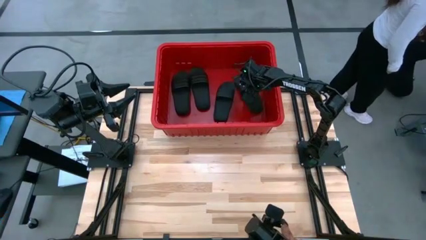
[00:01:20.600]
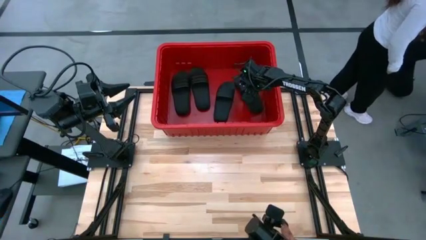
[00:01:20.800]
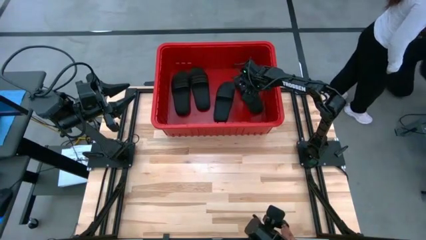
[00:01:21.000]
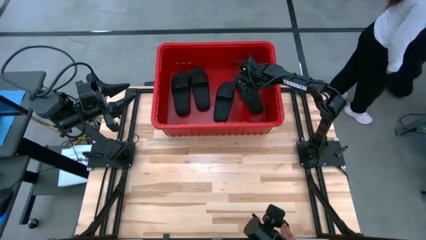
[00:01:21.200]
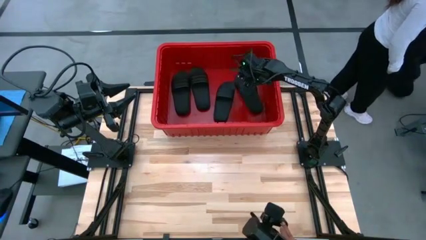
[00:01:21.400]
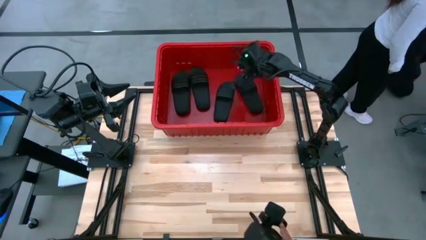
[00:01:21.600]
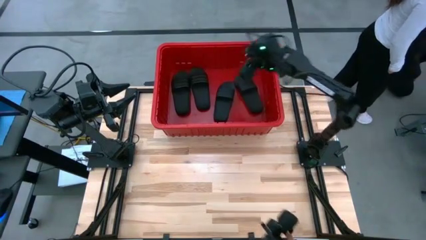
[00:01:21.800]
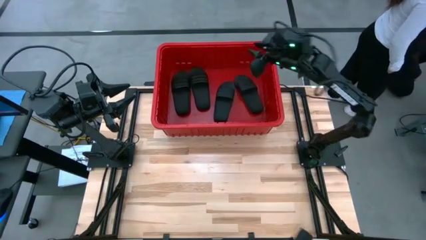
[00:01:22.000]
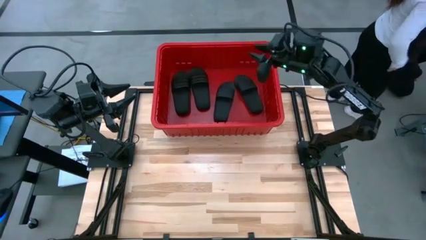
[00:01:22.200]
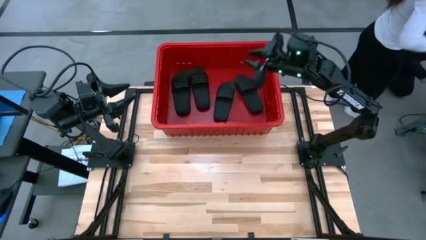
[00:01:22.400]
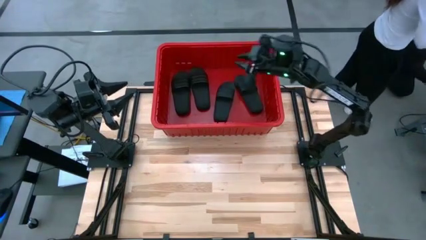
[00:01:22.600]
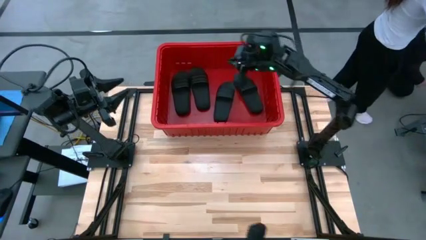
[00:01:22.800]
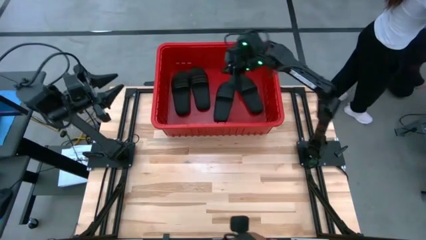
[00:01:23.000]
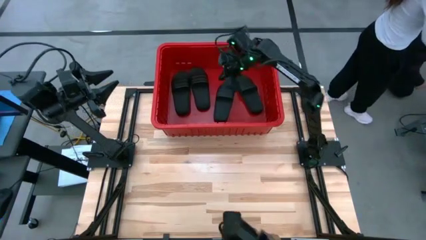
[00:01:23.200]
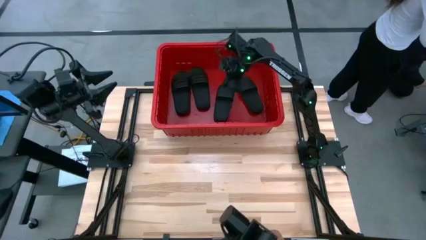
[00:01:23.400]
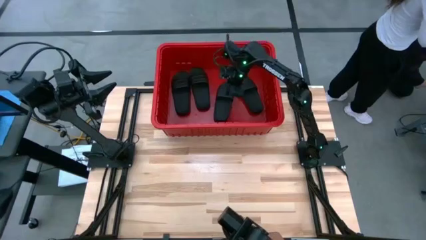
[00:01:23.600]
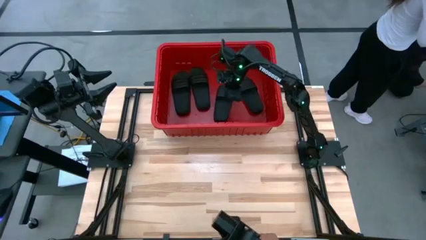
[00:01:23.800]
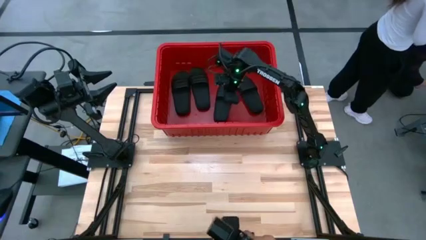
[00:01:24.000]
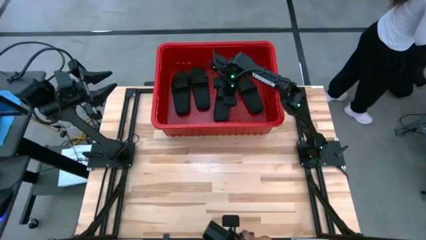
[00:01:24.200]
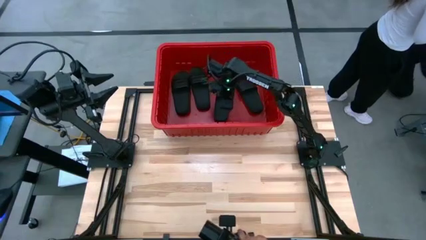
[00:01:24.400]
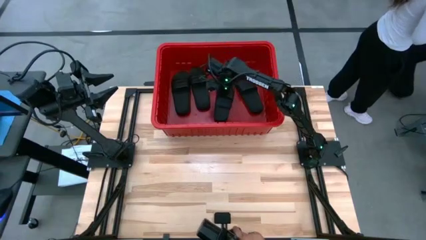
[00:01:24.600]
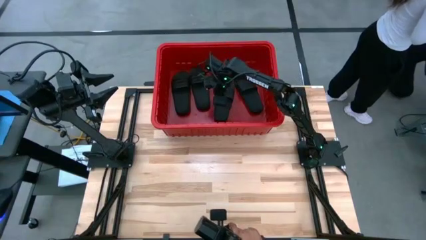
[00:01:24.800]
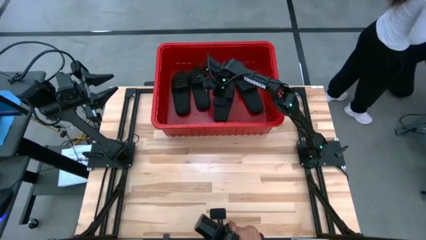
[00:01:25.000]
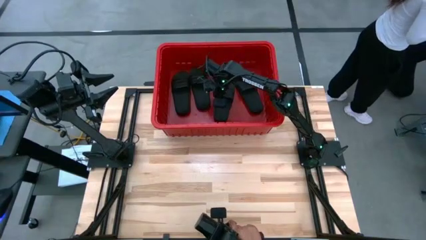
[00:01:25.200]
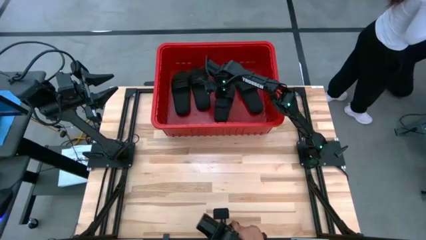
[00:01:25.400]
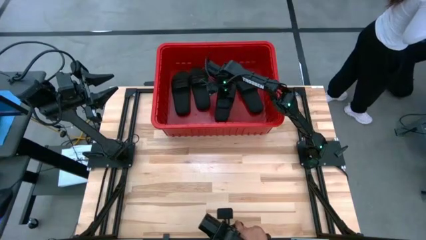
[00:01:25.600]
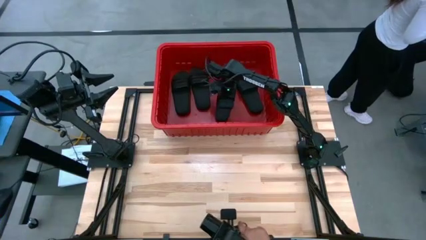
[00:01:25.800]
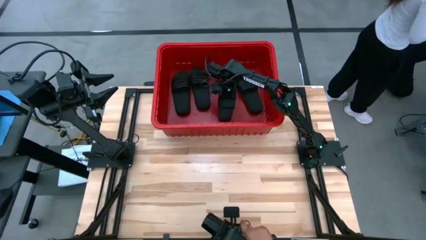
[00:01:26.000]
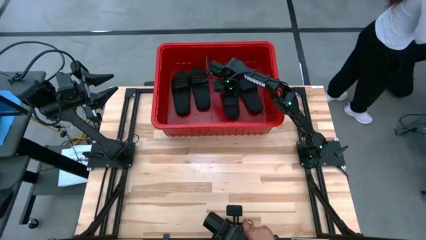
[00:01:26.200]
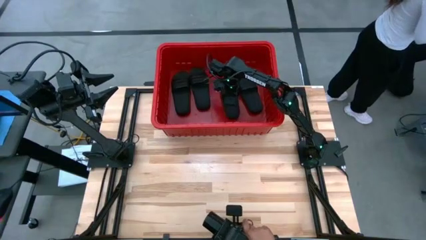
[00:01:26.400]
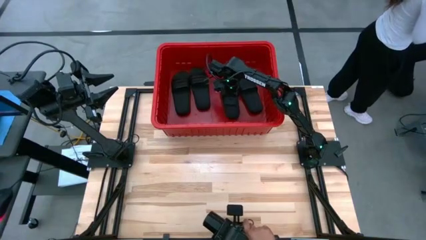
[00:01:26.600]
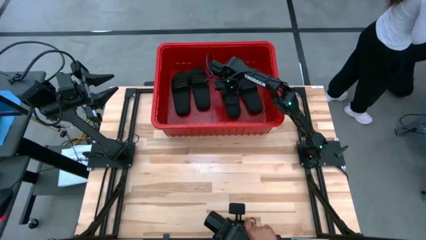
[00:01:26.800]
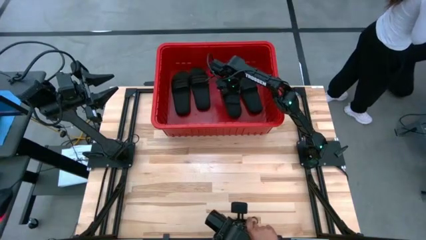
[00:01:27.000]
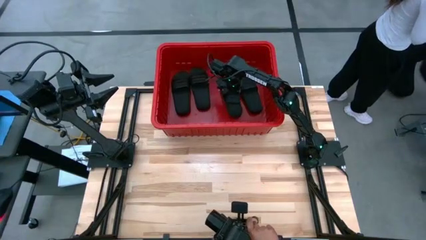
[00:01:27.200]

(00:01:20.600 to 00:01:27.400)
Task: Pick and place slides into bin
Adjust the black slide in the red bin

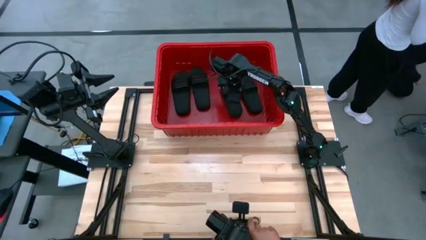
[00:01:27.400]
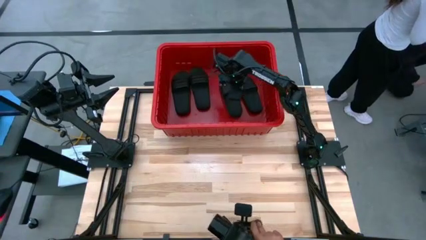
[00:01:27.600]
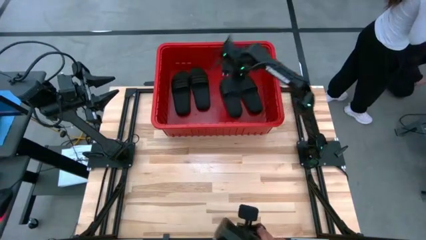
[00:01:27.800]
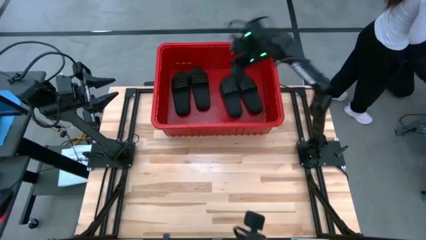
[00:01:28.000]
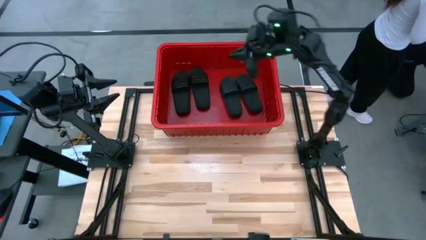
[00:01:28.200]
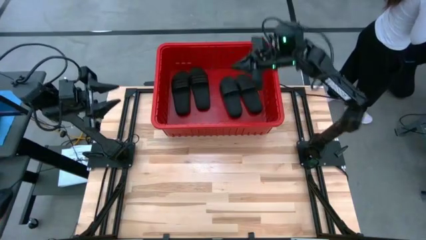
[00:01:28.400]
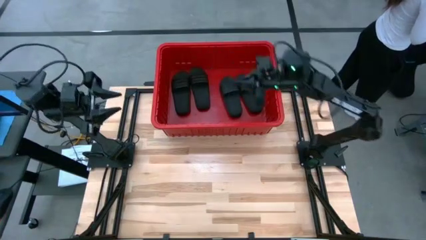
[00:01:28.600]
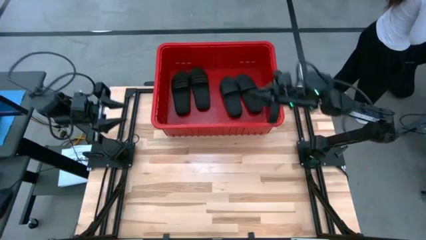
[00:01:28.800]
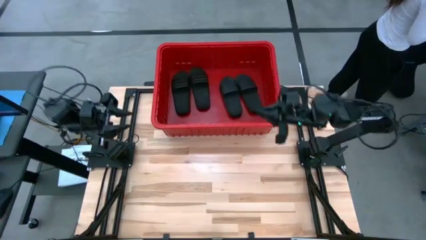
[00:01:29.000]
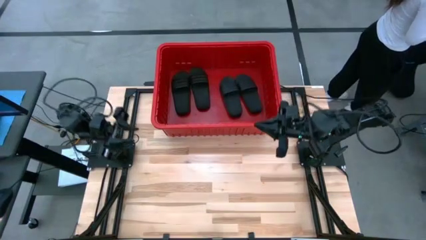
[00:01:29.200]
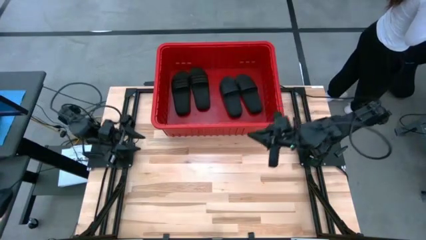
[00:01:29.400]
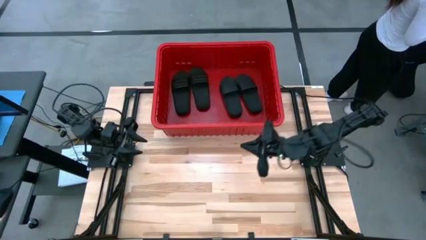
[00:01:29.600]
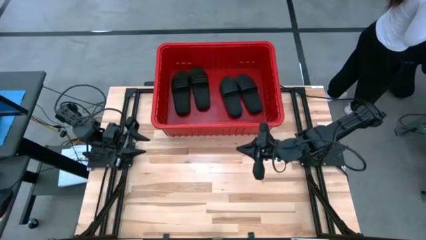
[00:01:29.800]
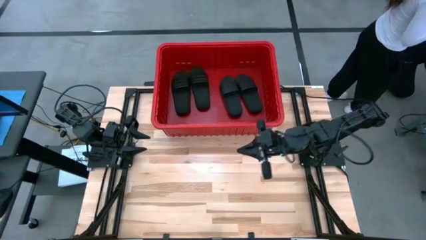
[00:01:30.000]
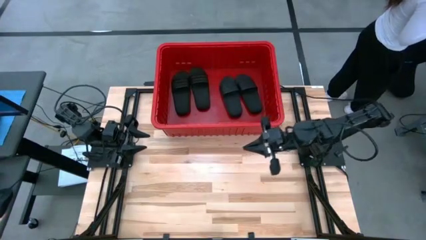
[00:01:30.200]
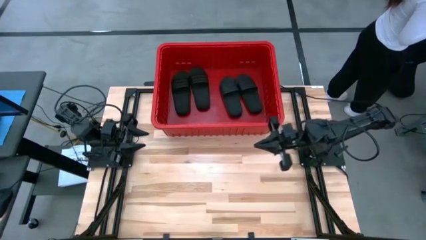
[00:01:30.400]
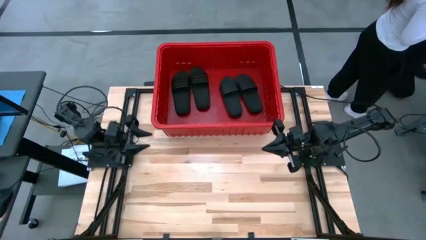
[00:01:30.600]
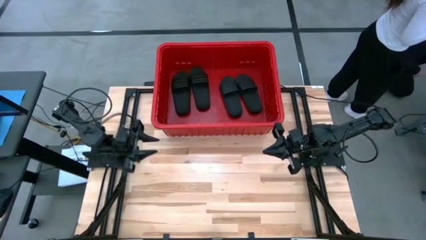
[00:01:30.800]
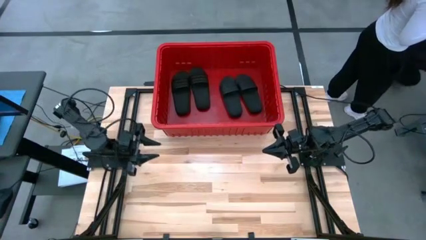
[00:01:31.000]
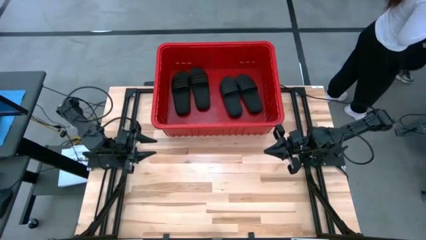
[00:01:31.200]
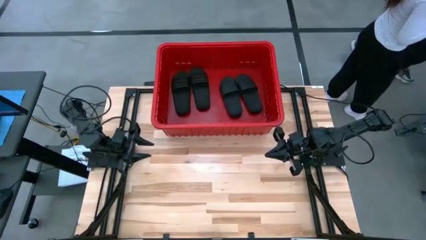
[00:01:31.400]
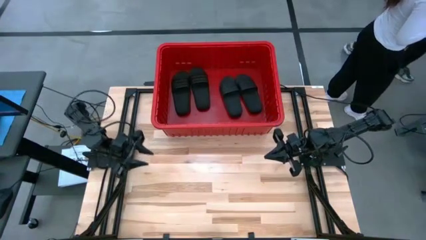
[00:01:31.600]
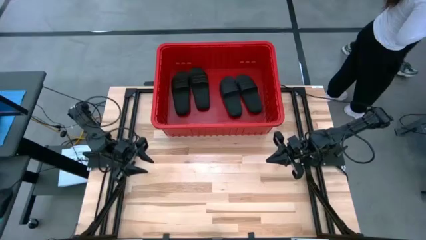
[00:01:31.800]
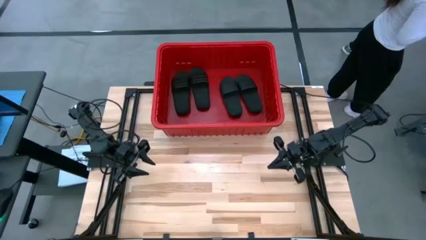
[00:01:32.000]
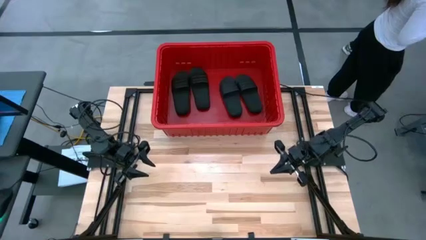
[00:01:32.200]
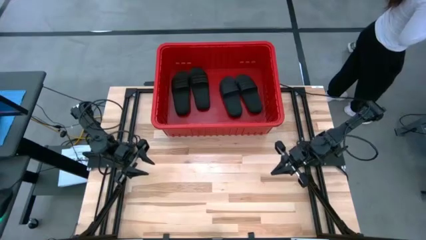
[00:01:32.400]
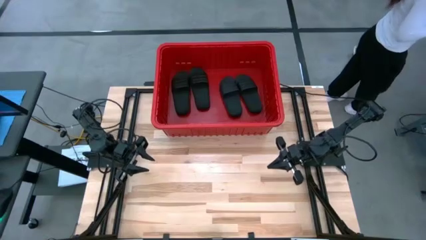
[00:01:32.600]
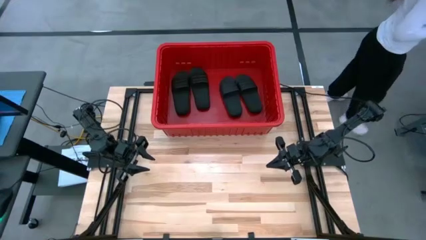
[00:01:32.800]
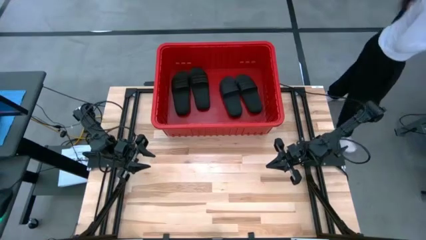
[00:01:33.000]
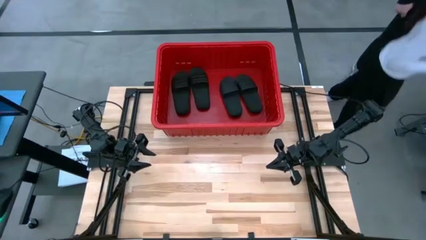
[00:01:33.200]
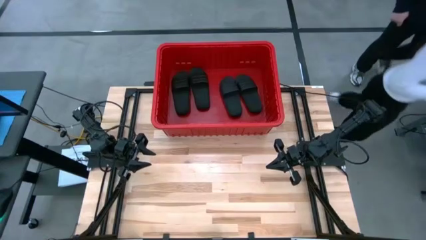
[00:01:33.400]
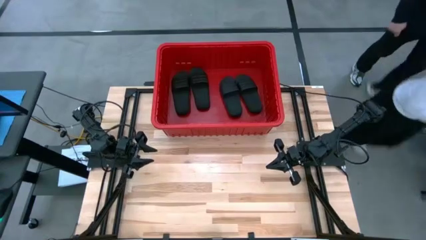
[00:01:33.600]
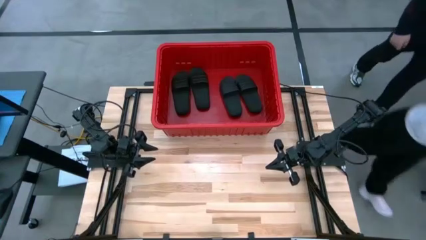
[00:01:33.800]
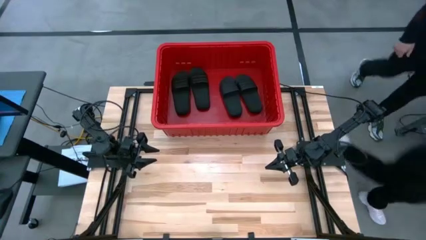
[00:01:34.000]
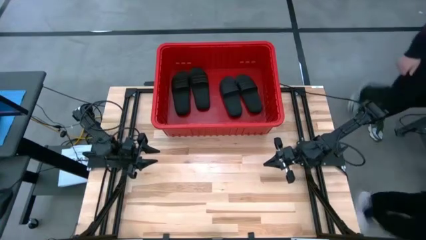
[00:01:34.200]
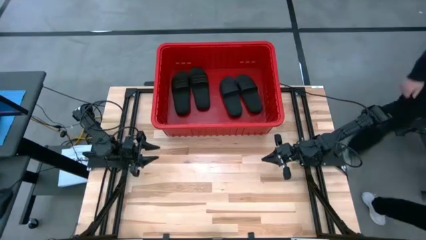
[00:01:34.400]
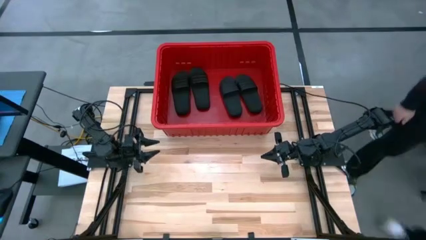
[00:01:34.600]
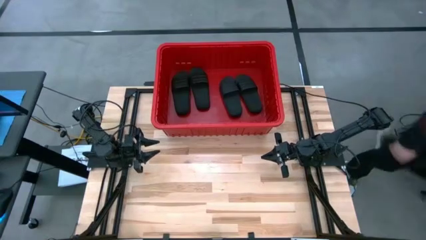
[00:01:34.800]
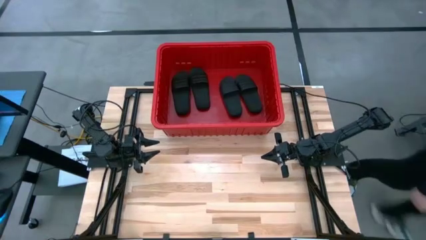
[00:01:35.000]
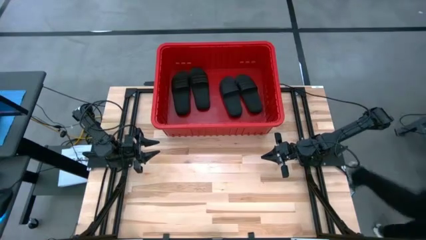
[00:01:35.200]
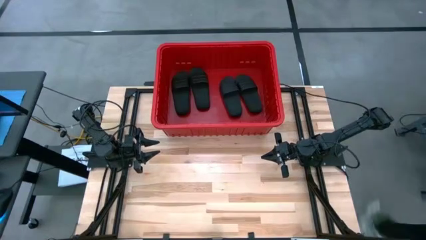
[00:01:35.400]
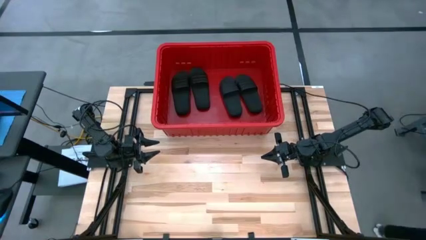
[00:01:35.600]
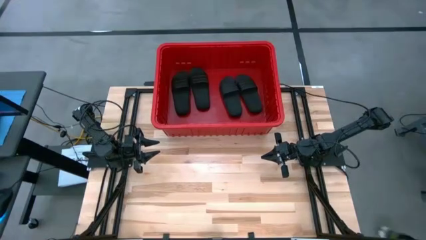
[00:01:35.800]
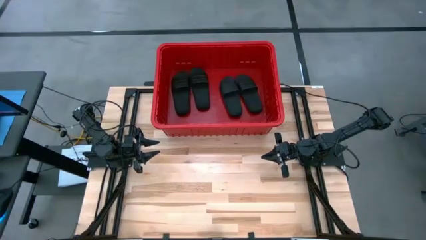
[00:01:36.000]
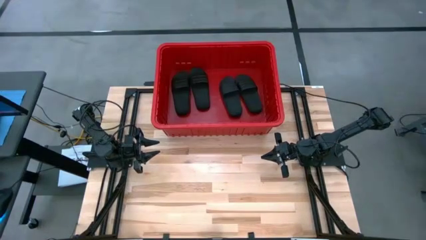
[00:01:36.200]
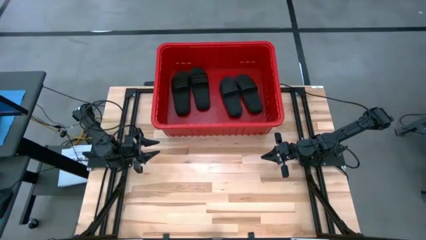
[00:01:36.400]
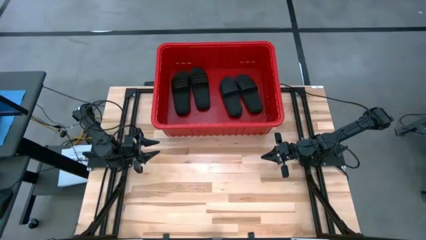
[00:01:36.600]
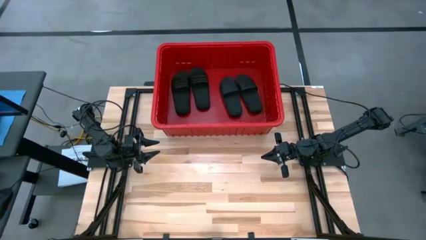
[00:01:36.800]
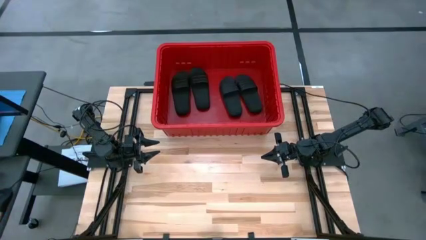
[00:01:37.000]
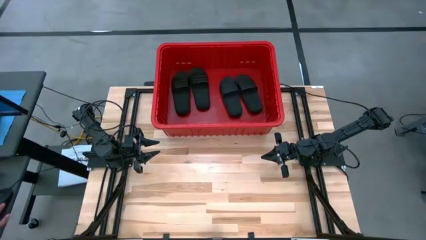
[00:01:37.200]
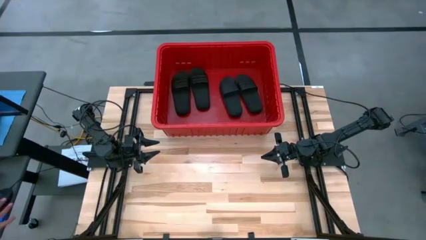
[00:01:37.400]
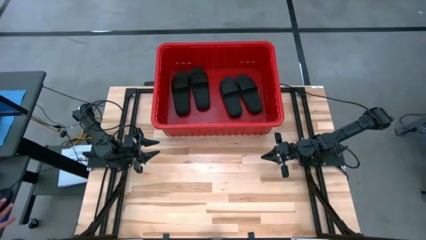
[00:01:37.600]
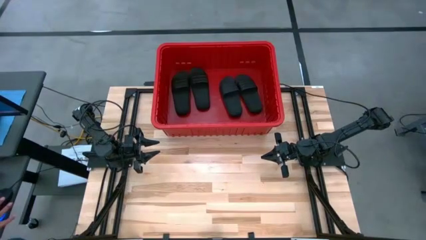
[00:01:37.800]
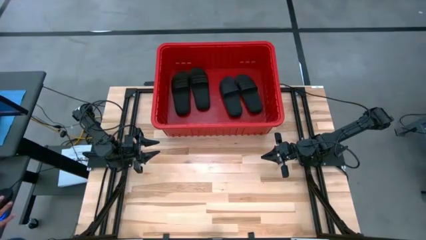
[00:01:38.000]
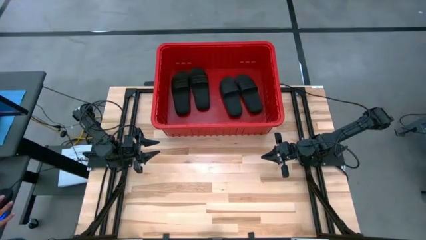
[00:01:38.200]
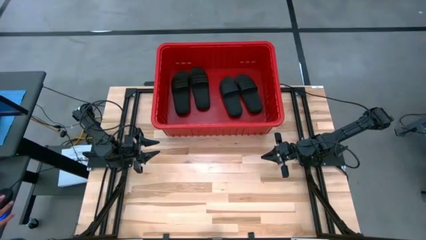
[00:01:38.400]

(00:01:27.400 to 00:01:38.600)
Return to Home Position
